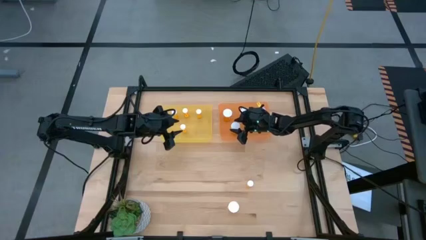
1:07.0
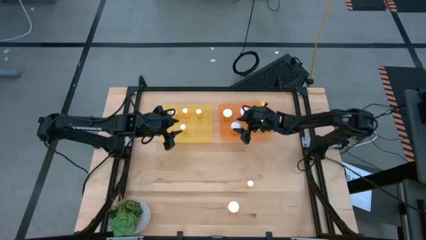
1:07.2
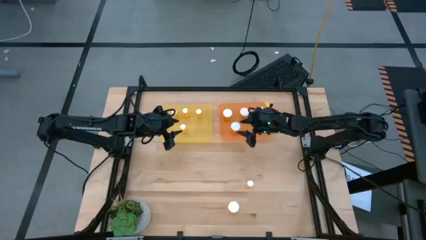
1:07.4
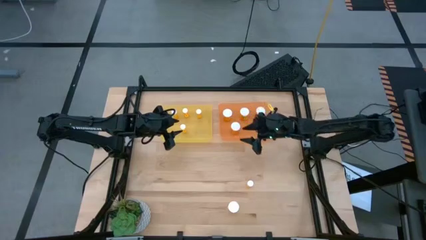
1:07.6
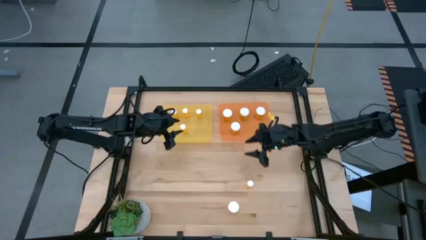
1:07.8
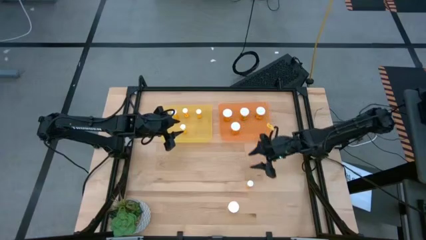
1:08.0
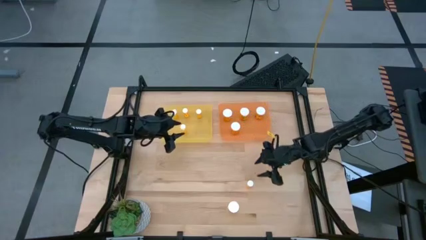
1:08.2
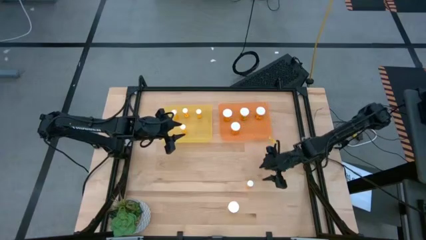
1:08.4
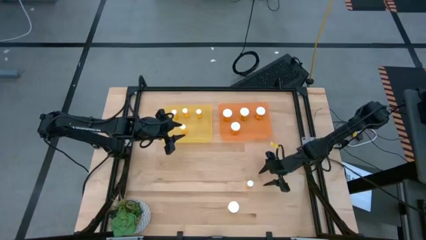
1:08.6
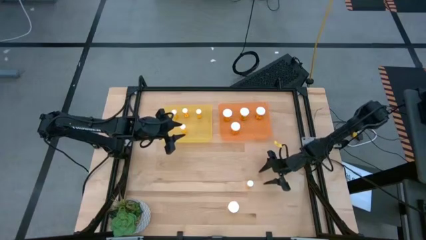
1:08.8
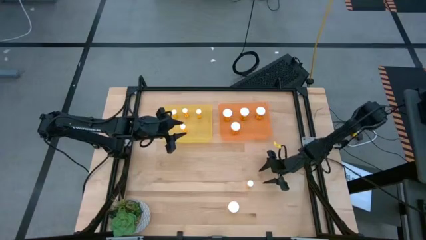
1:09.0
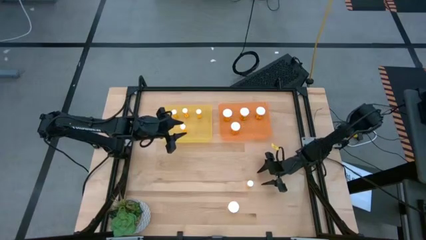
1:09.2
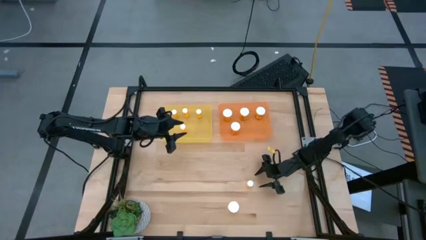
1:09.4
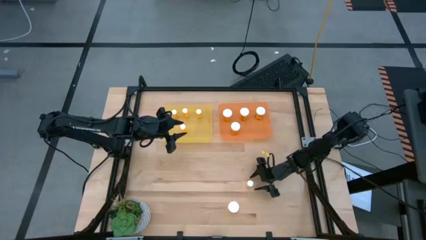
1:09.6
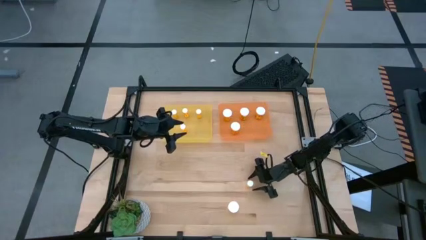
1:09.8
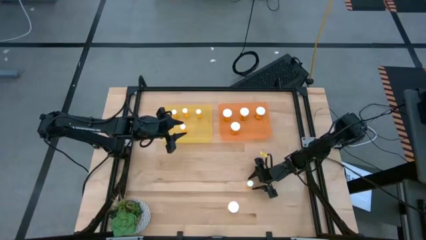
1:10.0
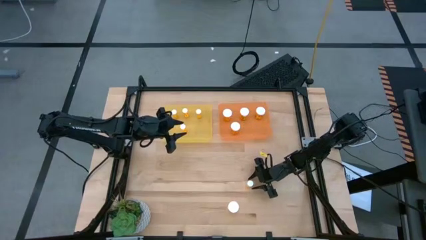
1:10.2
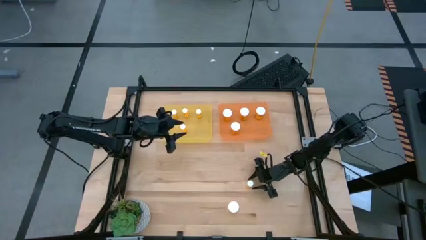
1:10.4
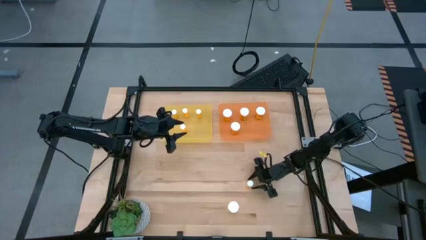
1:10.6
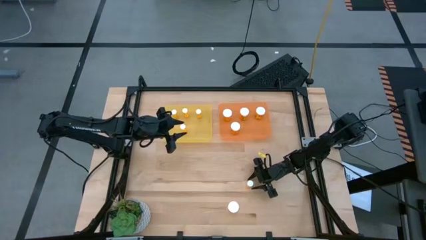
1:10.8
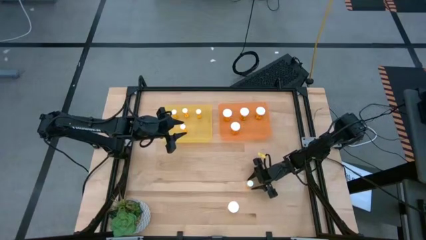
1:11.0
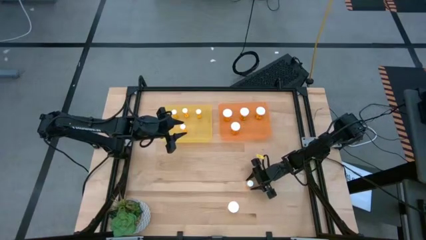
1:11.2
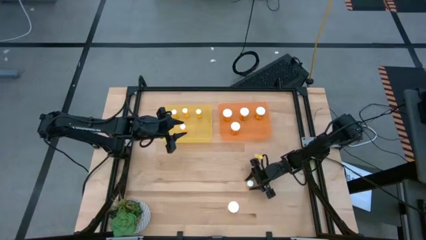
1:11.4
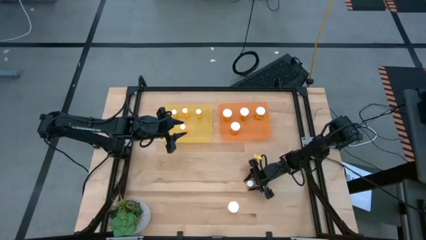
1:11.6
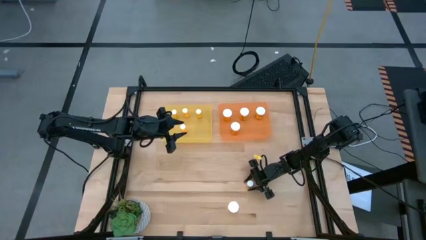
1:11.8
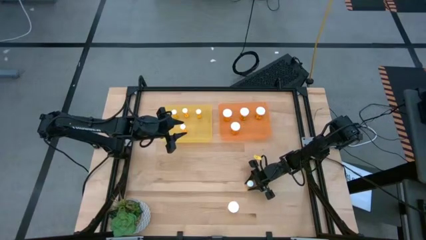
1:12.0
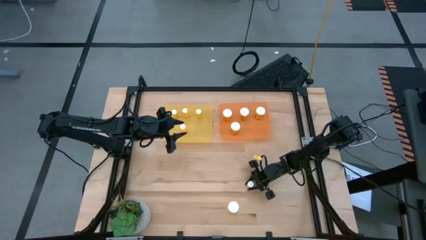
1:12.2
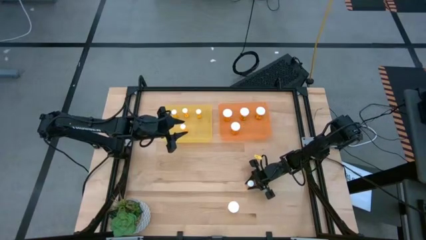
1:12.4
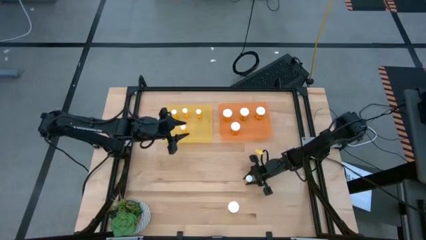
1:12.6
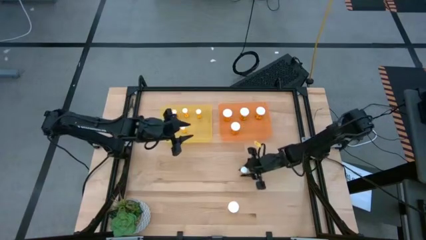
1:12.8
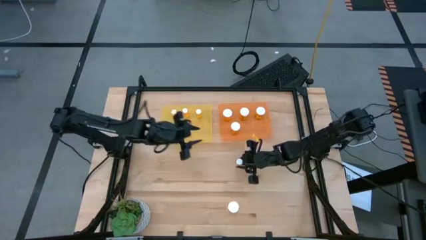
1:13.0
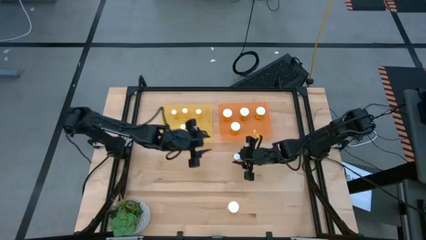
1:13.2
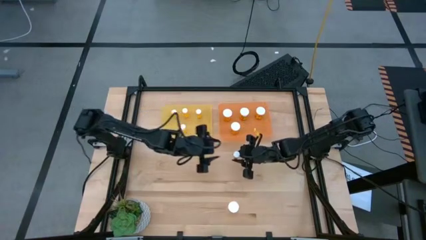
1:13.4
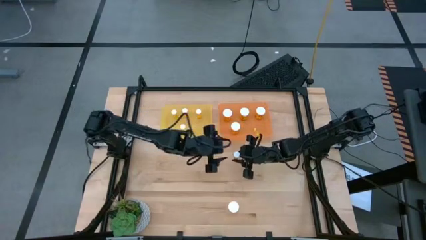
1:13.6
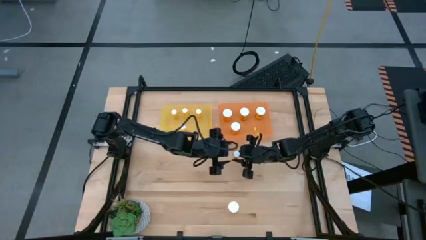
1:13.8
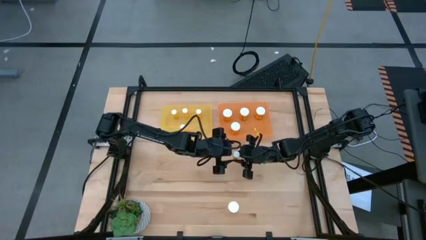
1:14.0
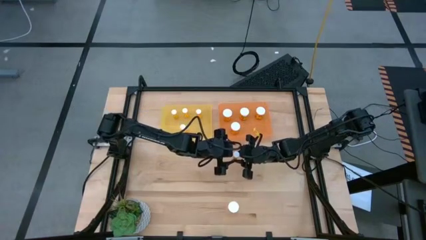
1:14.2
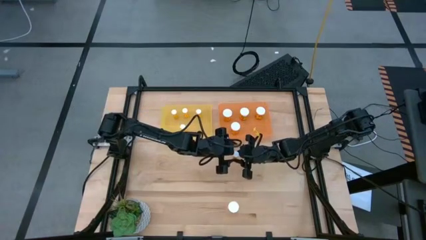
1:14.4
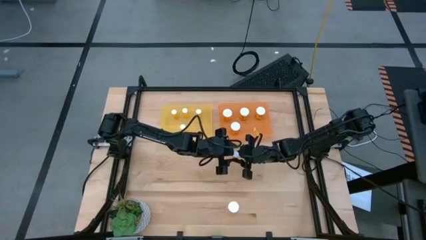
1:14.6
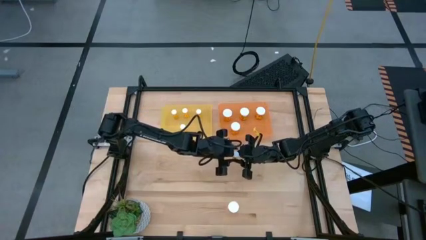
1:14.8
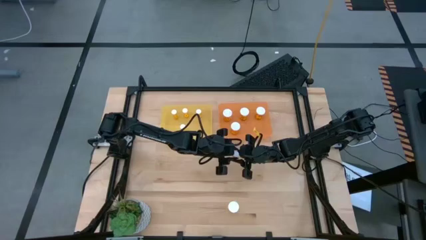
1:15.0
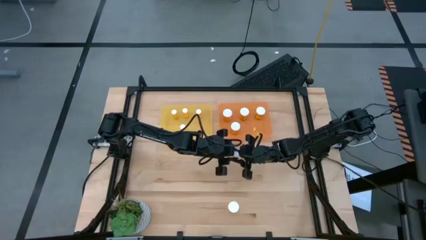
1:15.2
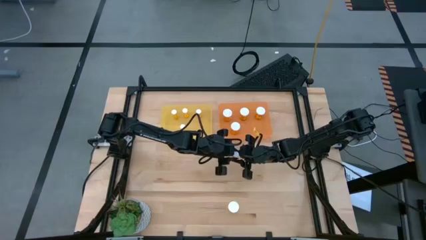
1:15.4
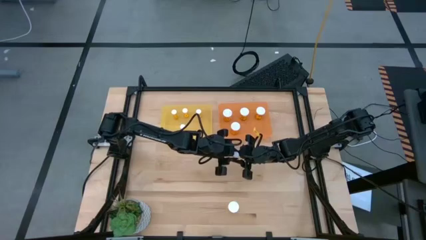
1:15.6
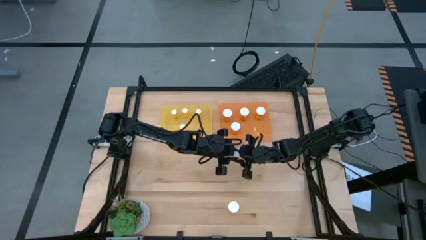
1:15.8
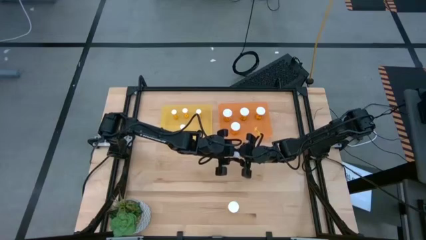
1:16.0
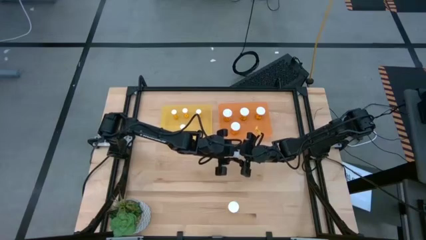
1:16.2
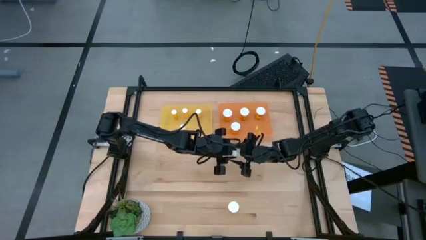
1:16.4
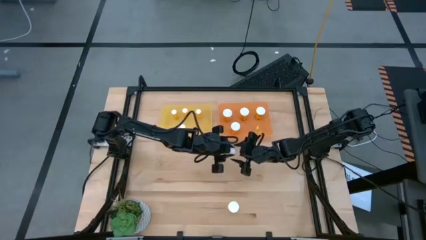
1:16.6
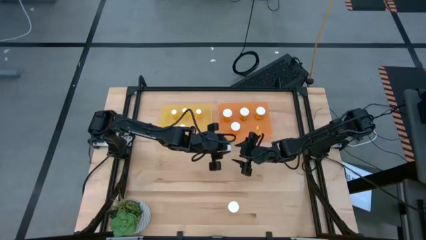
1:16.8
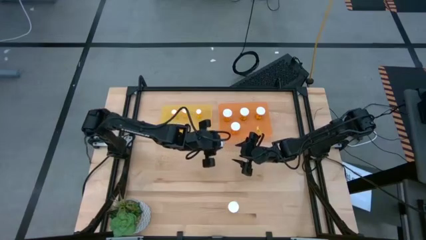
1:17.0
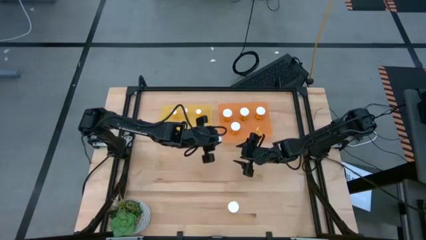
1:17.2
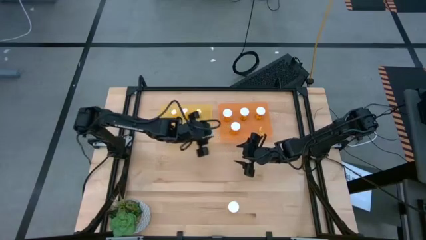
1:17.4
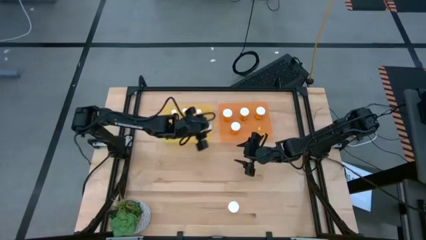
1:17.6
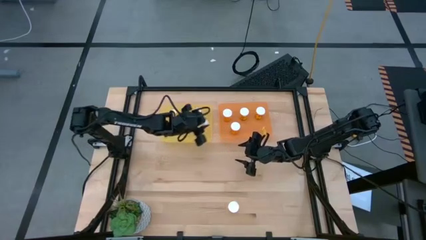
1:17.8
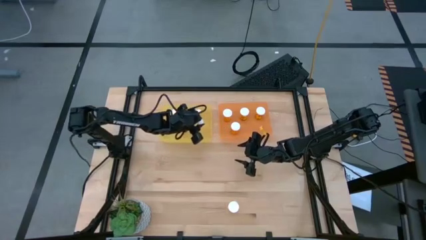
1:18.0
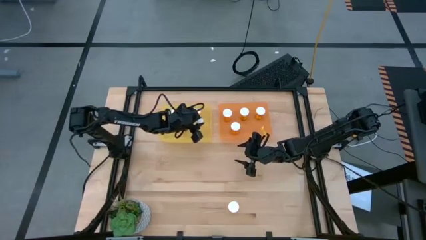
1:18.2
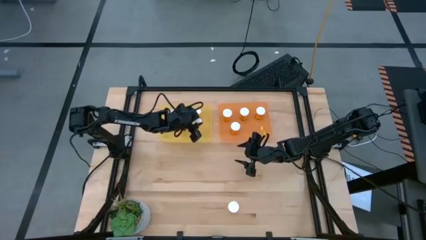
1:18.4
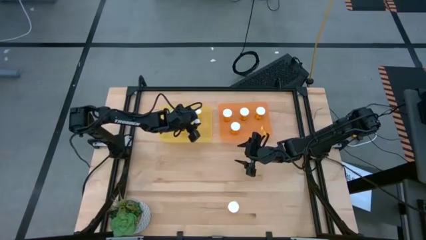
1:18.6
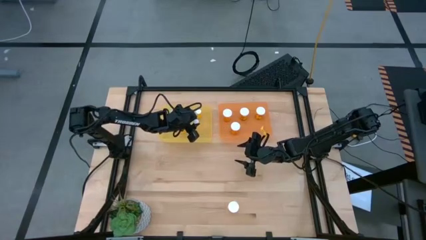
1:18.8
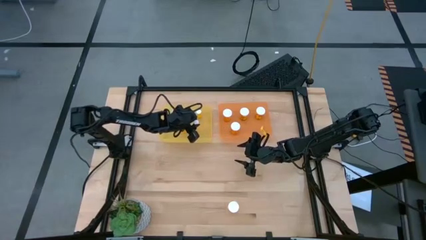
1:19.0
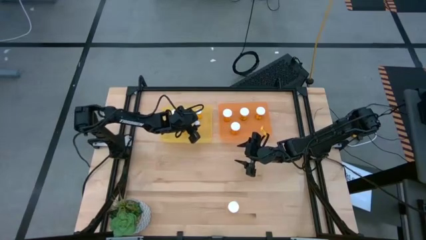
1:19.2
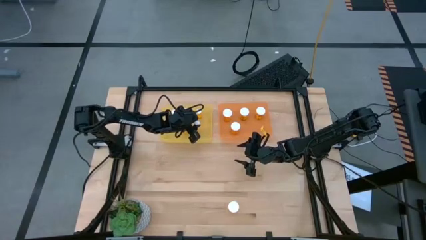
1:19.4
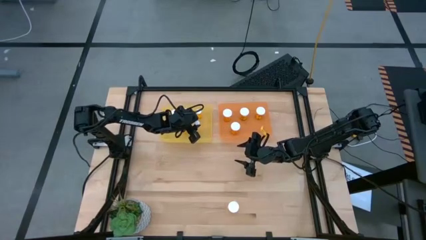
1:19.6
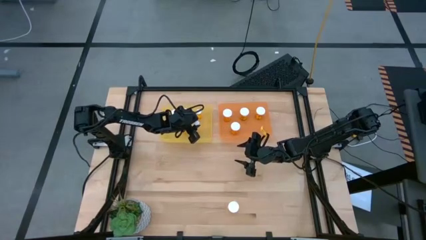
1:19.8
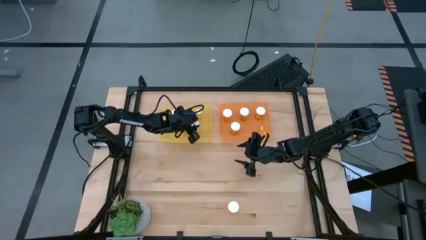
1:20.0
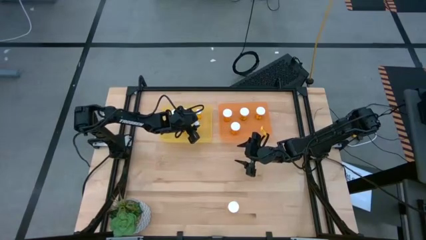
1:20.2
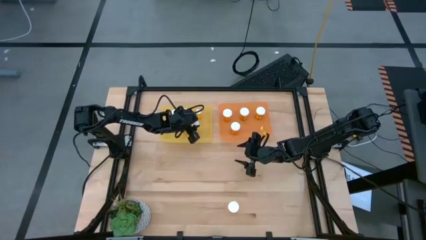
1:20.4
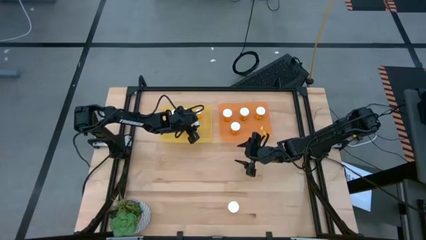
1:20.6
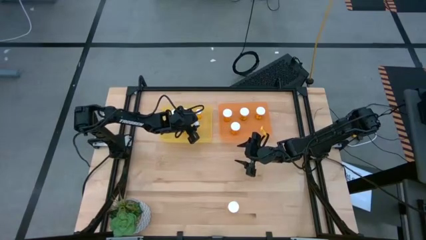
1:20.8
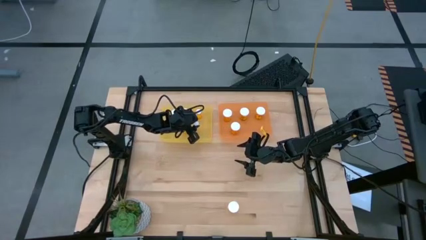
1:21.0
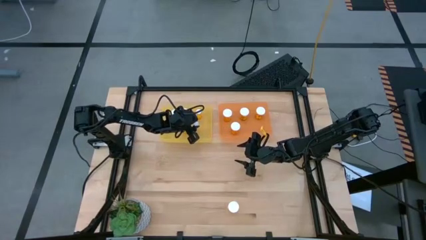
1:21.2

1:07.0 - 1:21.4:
Task: Pick and place medicine bottles into bin by pill shape (circle, oval)
Put the small orange pill bottle into the yellow bin

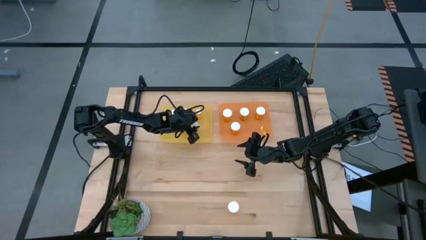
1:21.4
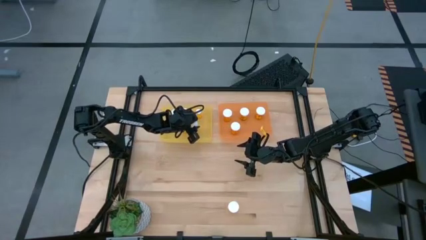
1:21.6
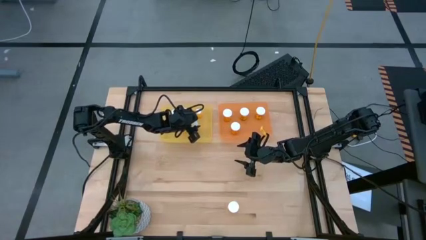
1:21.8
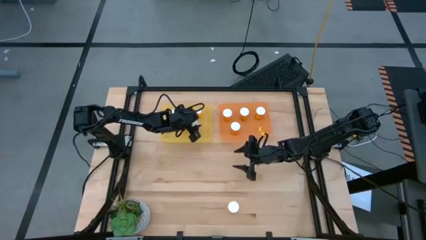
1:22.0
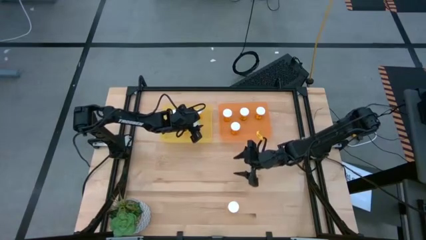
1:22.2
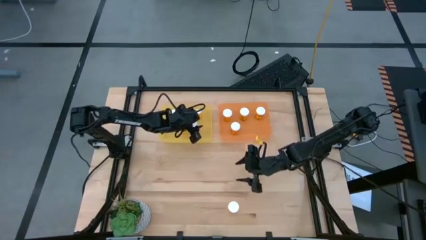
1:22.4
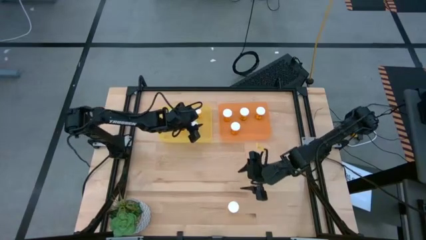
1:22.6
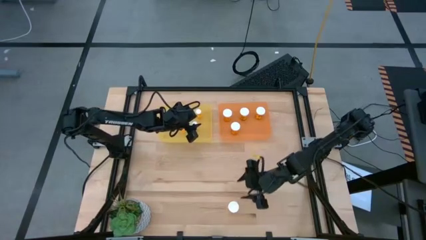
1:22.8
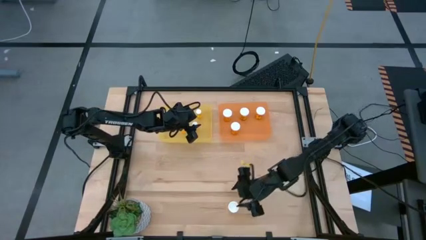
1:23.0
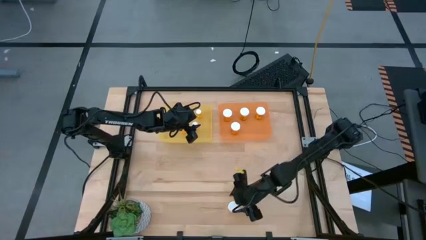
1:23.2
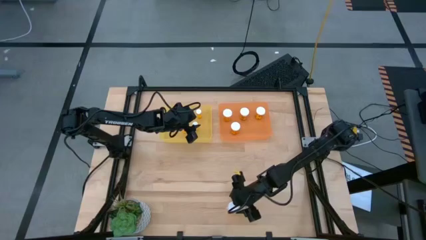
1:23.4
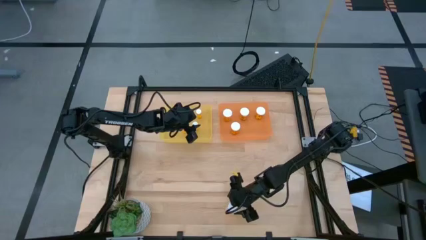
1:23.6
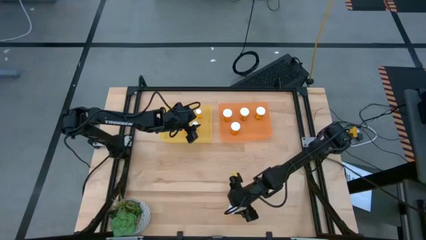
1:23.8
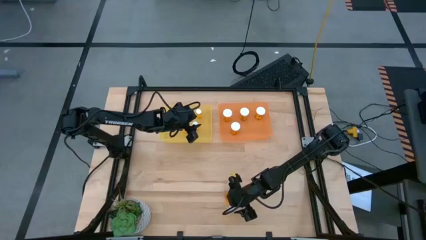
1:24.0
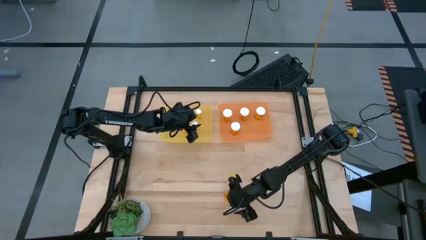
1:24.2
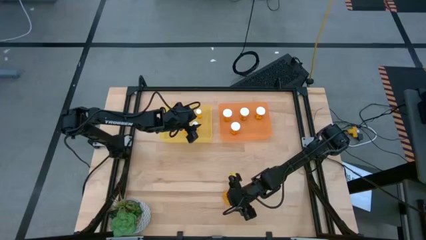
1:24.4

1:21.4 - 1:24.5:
Put the big orange pill bottle into the orange bin
